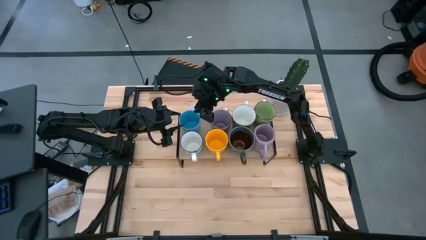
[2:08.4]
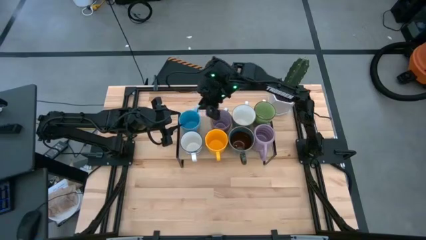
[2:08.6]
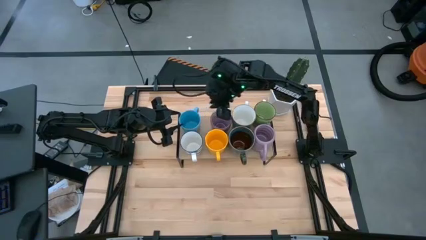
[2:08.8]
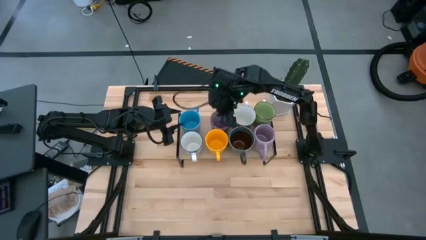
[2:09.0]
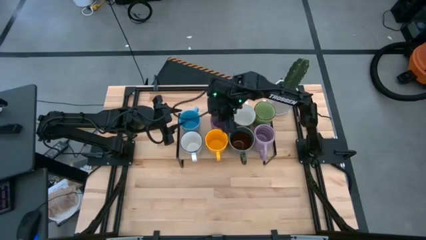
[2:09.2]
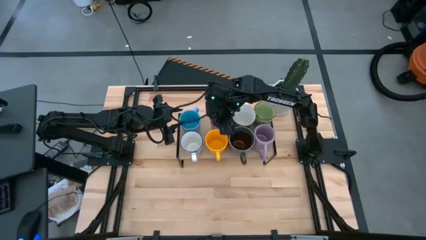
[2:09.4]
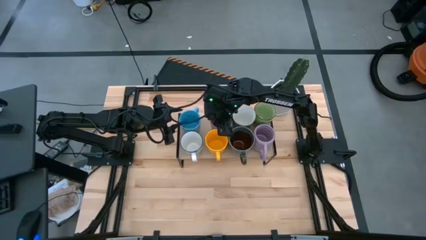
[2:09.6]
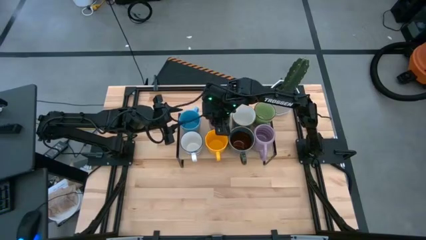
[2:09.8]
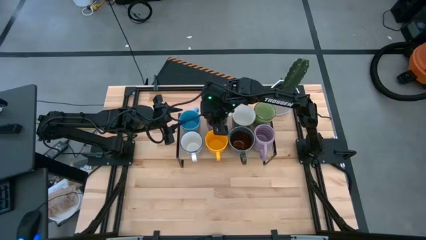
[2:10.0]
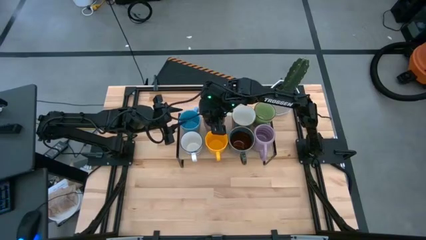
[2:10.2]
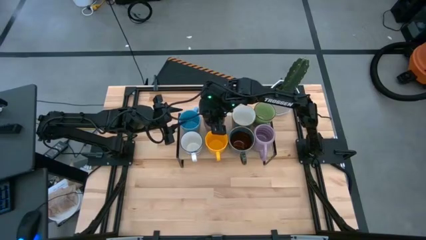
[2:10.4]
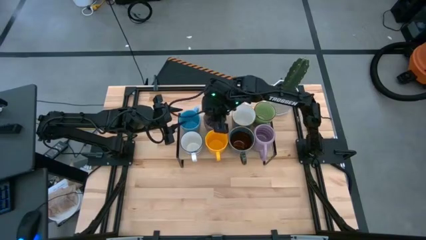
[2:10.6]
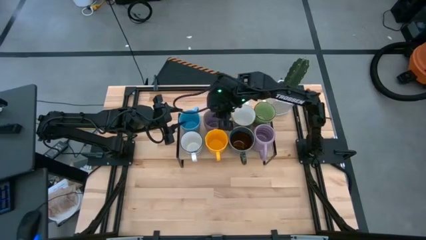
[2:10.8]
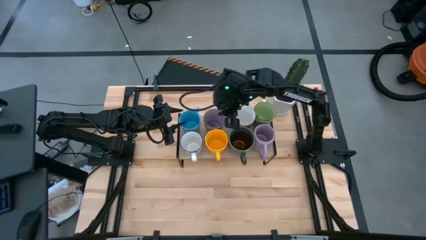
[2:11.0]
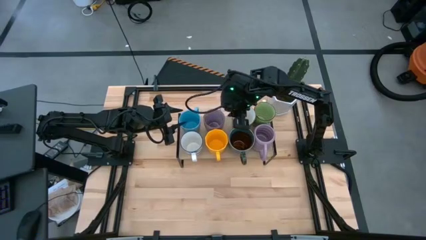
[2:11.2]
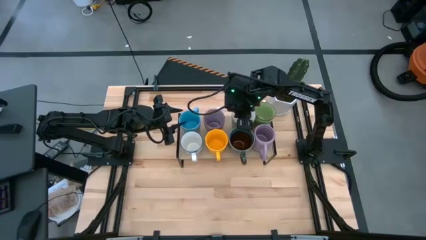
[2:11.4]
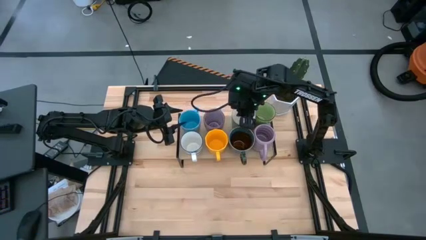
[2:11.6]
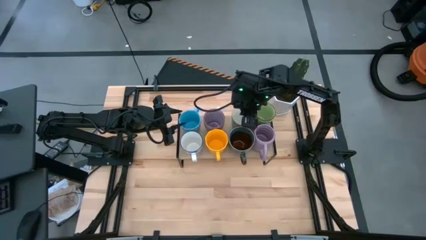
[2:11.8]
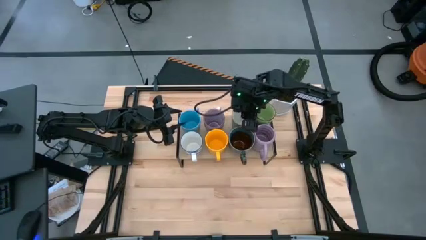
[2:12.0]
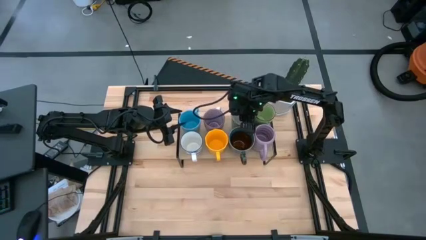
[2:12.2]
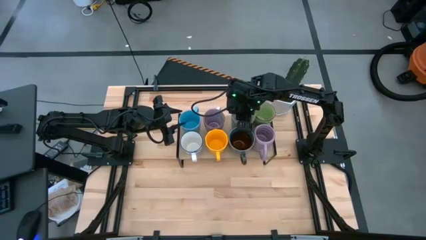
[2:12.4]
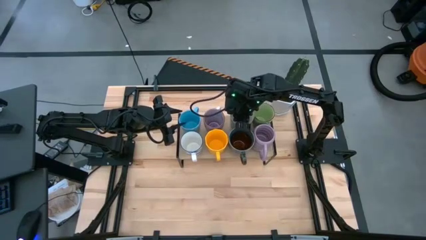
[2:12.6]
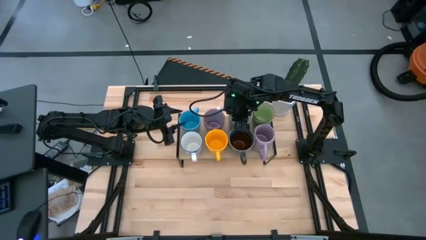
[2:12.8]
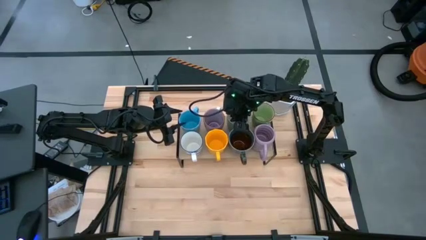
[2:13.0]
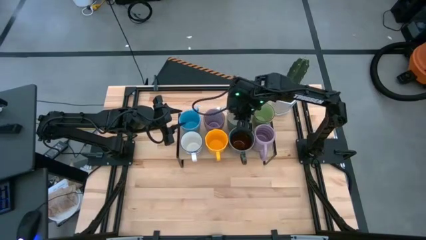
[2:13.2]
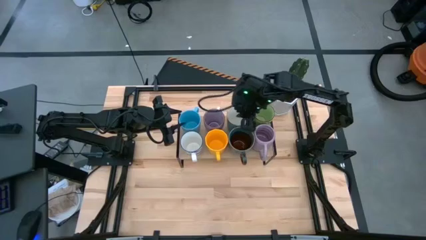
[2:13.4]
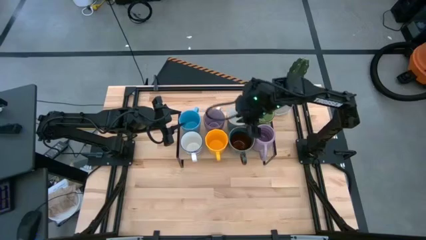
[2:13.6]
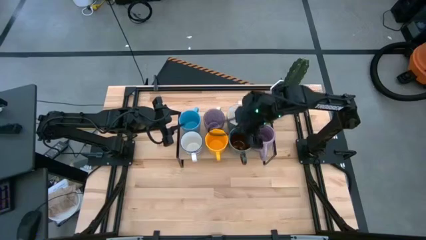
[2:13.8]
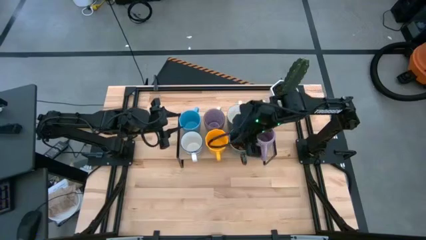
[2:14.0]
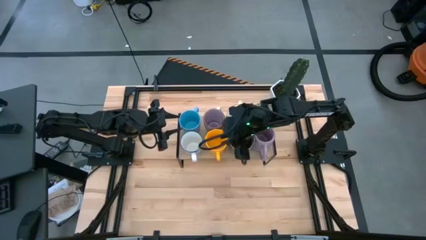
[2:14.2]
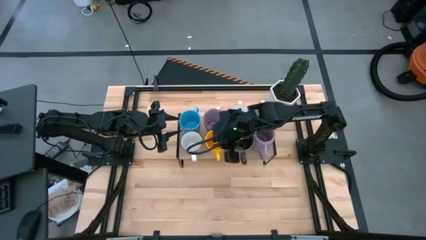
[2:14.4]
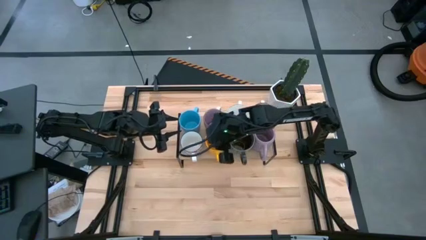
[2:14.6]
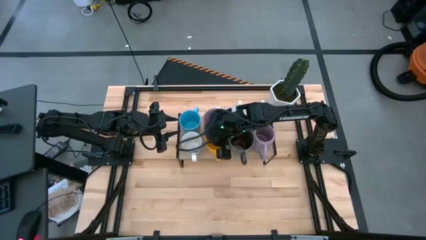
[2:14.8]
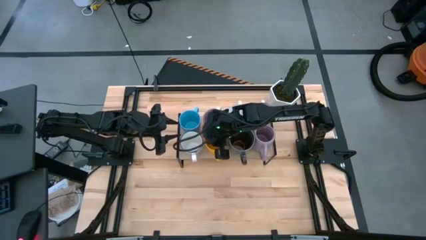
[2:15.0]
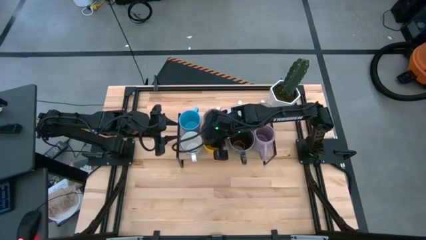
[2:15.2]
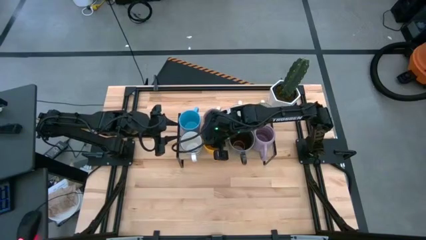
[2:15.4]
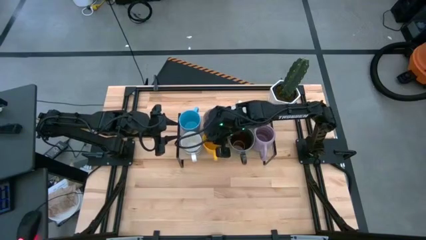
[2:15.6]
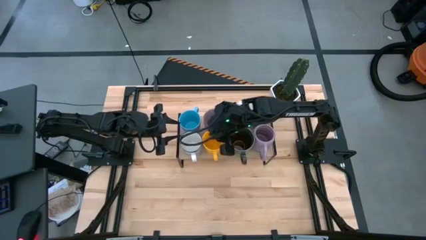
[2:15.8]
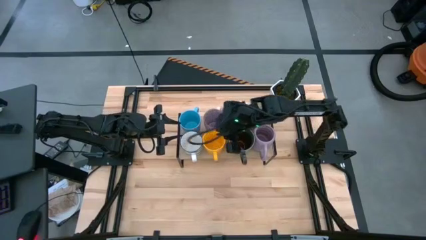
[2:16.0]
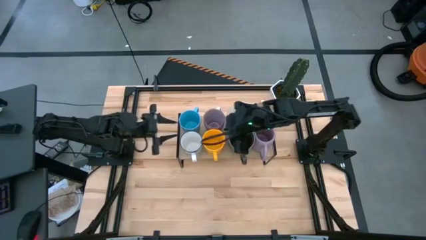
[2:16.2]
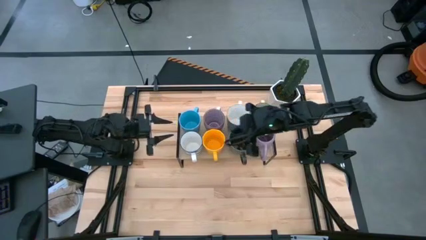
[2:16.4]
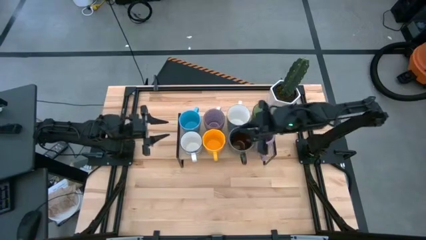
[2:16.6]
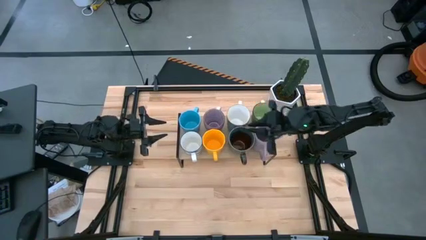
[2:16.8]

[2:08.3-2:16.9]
Task: Place coffee mugs
Adjust the mugs on the shelf

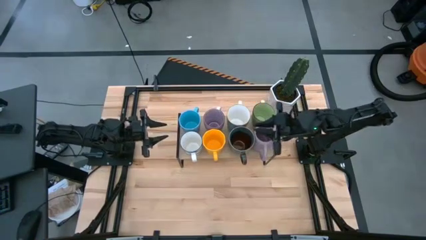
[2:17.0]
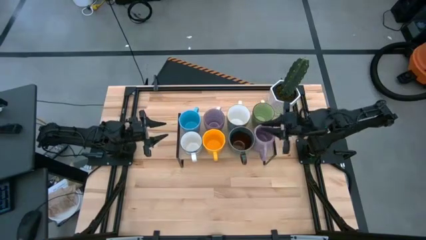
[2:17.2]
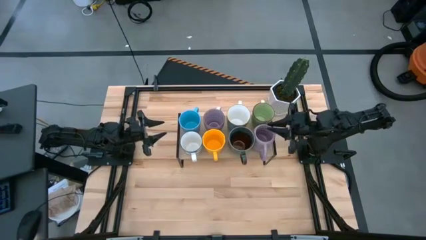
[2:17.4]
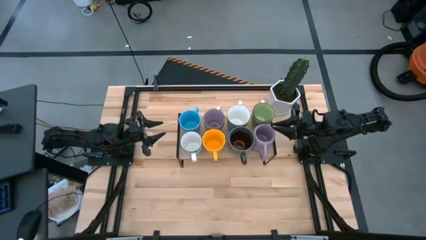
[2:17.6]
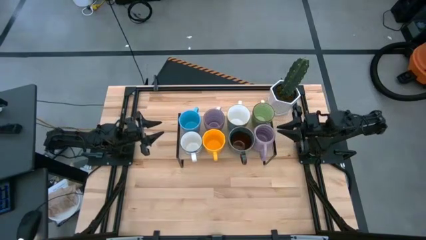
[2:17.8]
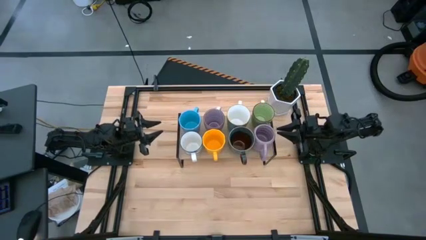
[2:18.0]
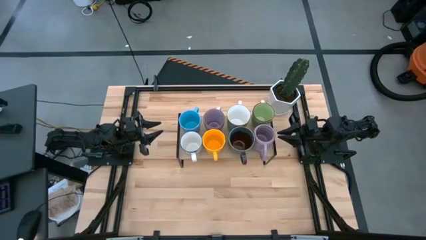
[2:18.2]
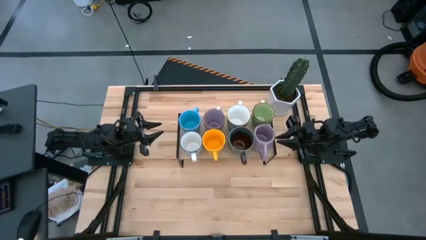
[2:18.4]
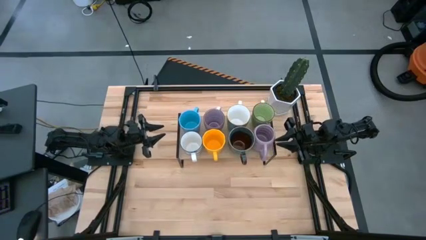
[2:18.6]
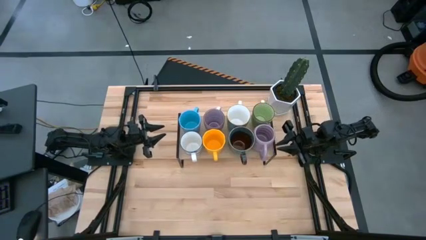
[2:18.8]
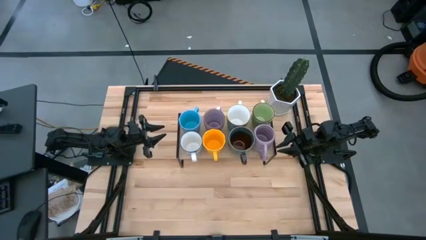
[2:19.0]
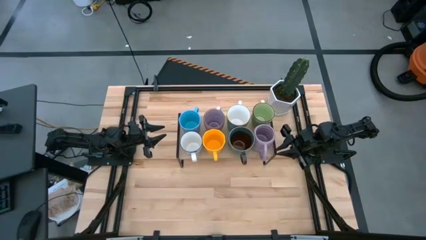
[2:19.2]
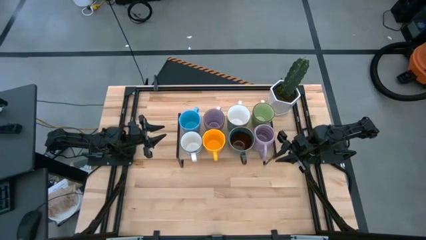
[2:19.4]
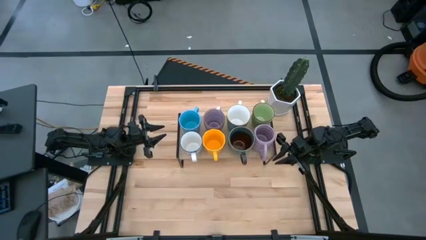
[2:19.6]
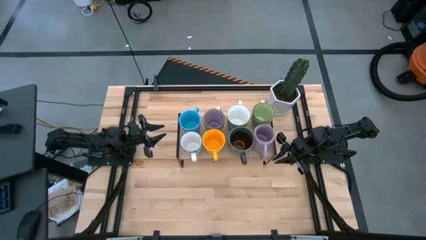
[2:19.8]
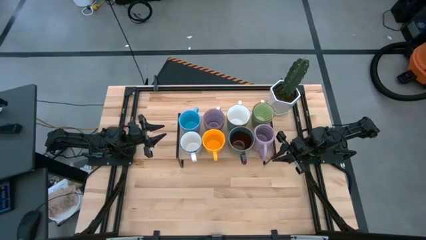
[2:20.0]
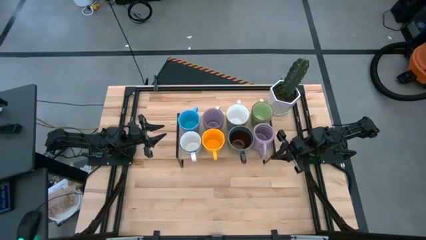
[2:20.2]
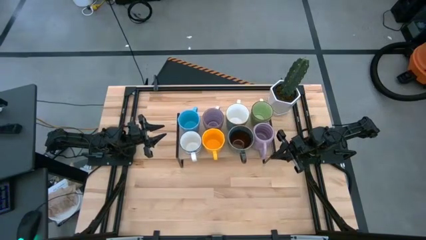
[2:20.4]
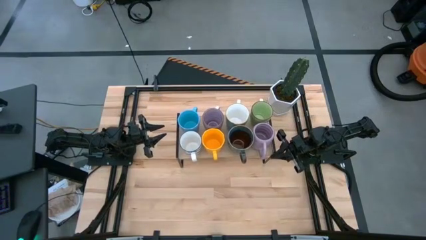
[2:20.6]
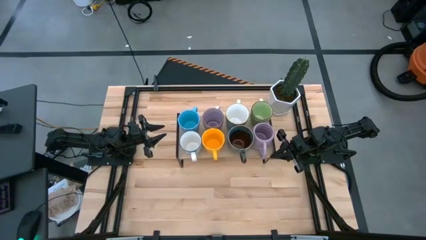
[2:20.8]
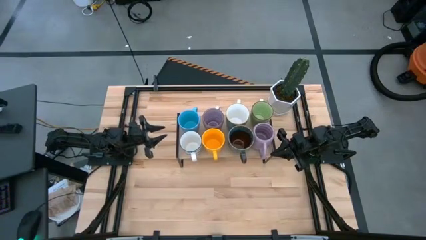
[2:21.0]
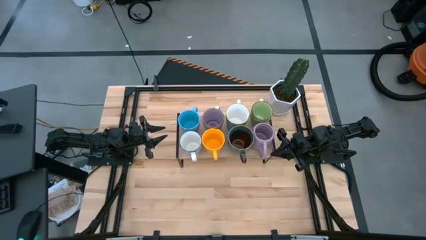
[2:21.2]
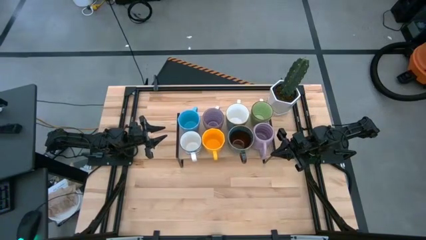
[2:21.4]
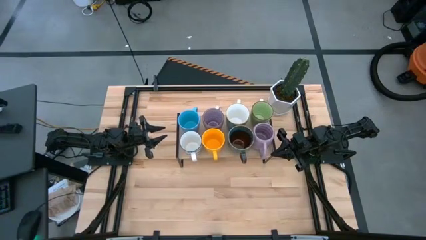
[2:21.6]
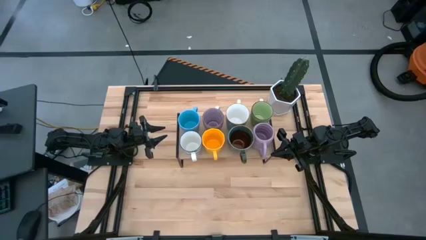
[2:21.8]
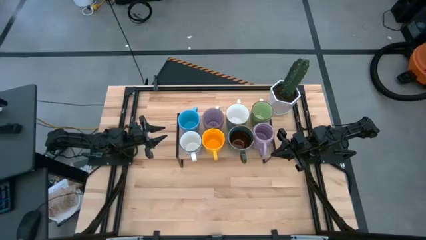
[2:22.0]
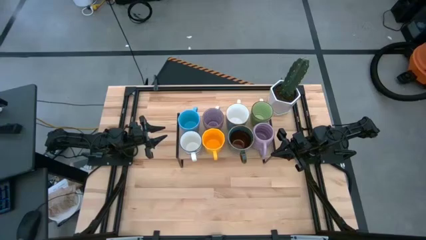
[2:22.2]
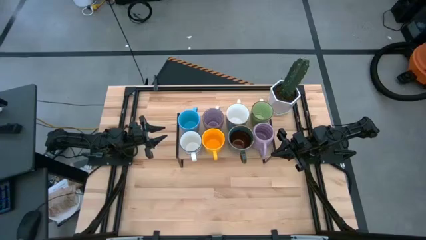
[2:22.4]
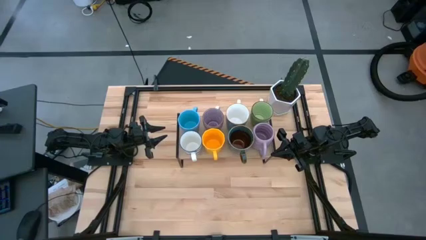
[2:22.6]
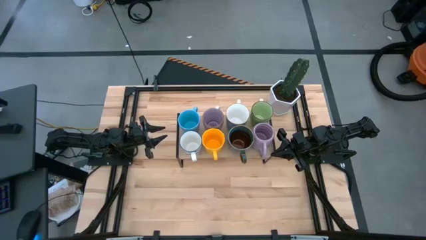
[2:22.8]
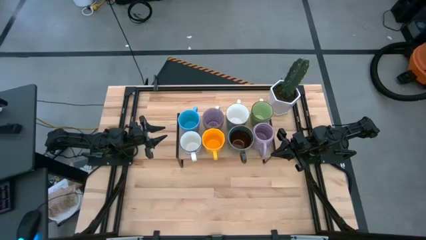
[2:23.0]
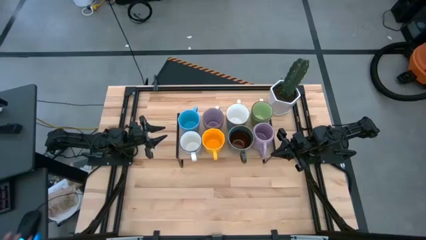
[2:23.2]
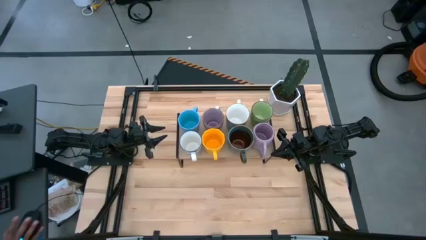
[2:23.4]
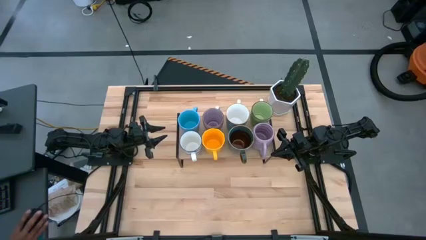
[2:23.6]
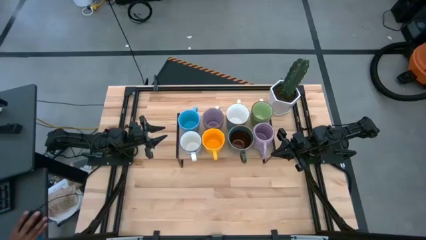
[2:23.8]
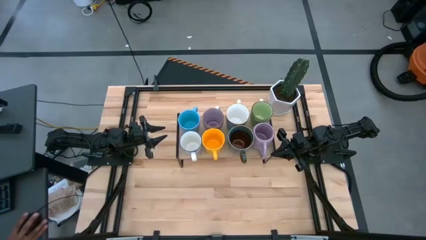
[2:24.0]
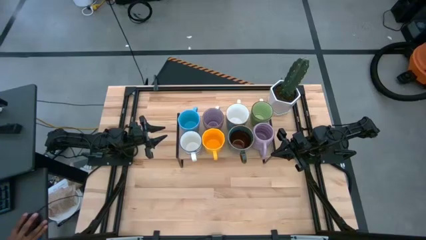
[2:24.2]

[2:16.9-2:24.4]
Return to Home Position

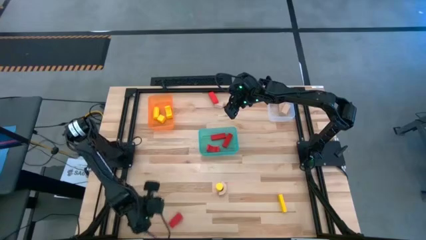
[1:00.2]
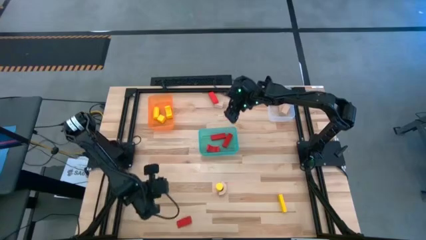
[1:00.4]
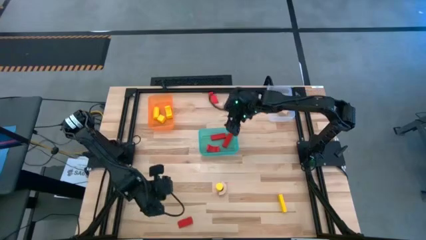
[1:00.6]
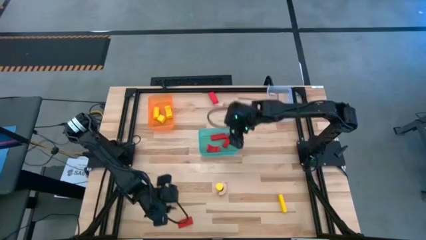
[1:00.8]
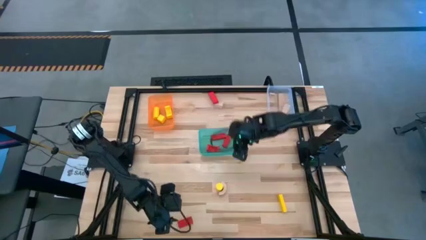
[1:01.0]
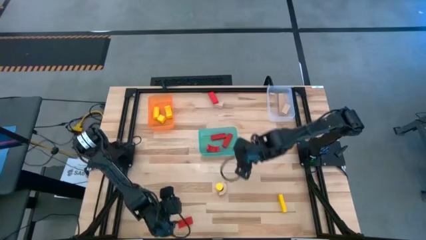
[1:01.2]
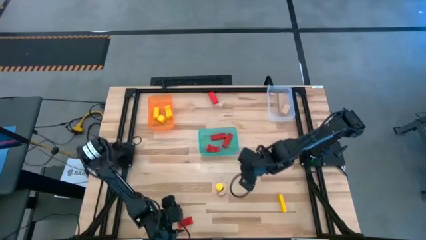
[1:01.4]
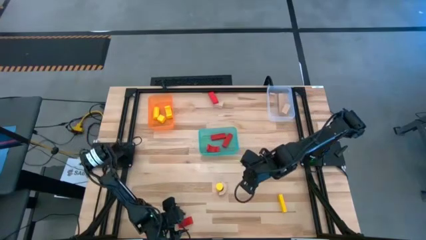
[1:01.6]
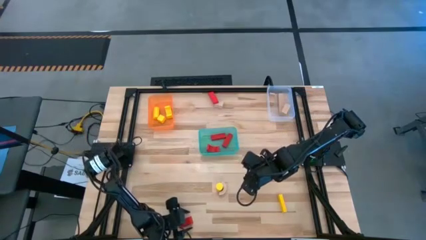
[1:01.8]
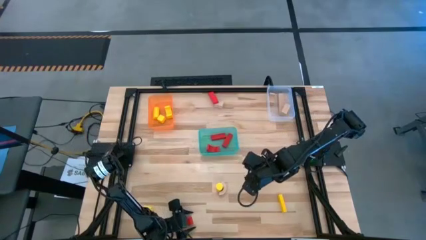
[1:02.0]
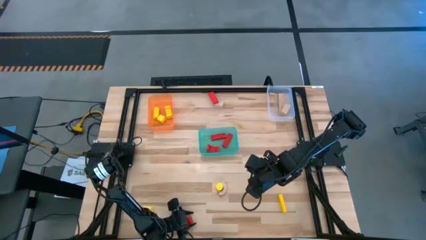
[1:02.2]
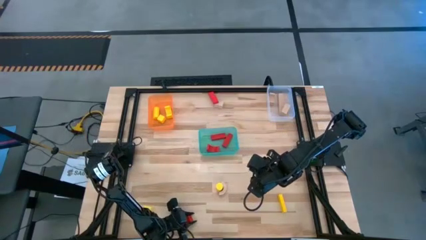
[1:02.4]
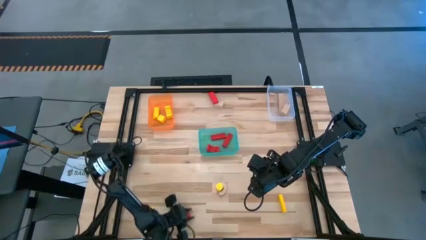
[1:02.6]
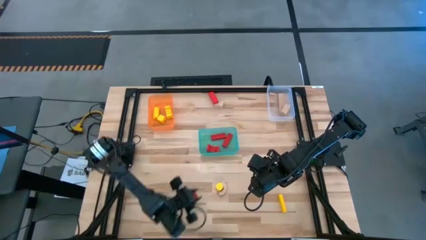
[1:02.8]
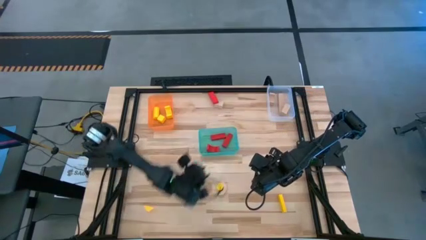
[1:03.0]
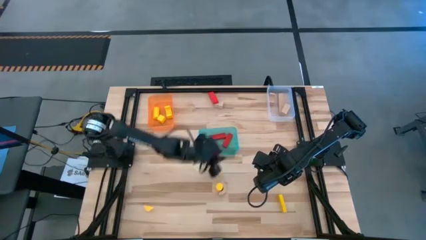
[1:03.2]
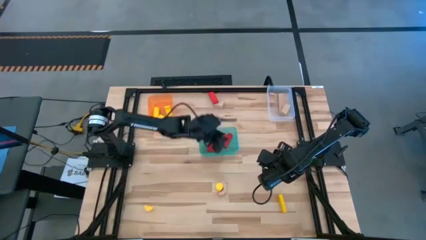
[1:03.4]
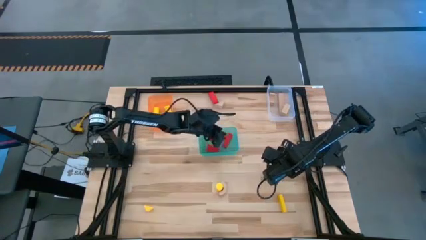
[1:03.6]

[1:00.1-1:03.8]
Task: Sort & place blocks by color
Put the red block into the blue bin
